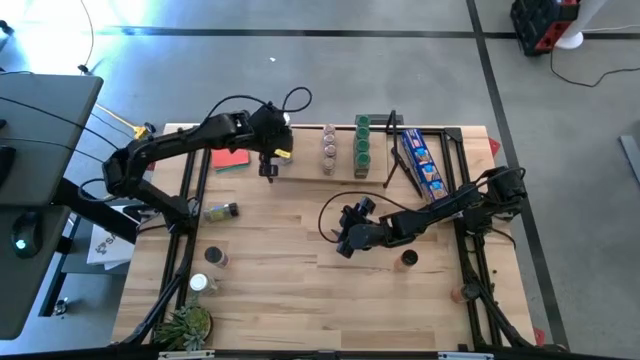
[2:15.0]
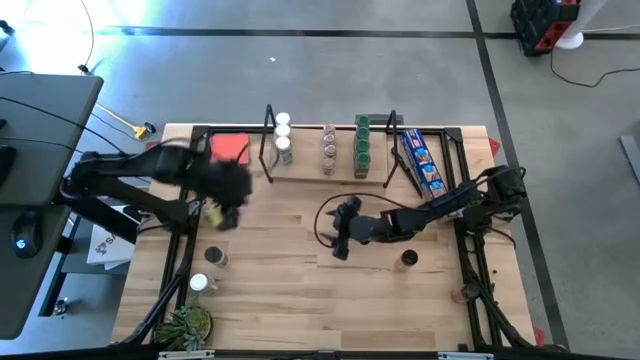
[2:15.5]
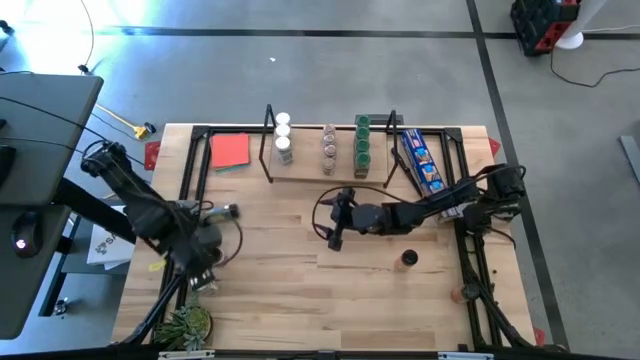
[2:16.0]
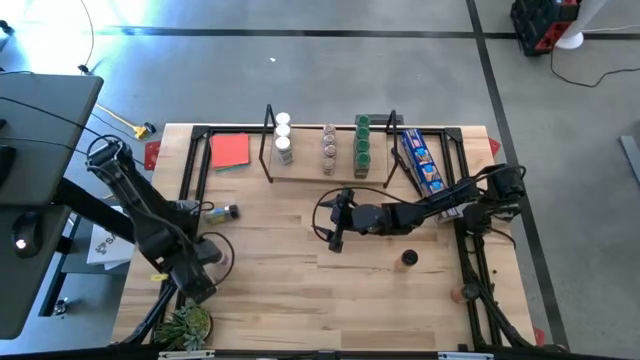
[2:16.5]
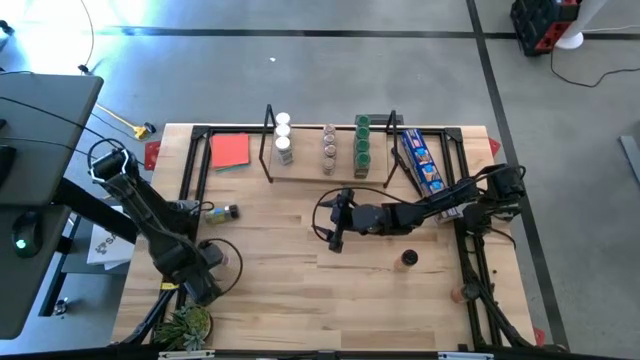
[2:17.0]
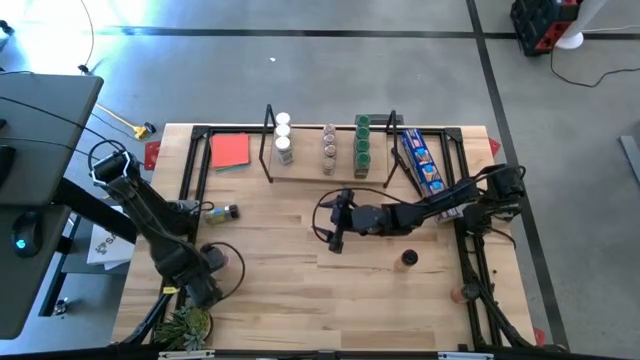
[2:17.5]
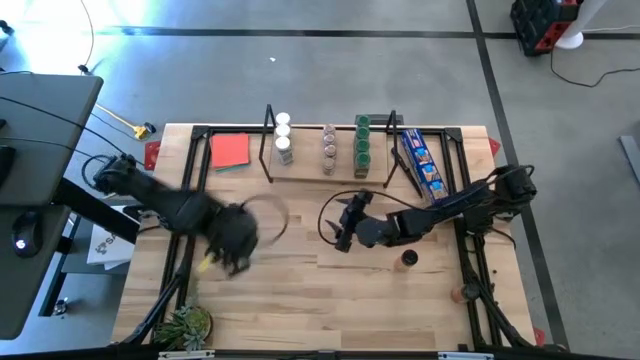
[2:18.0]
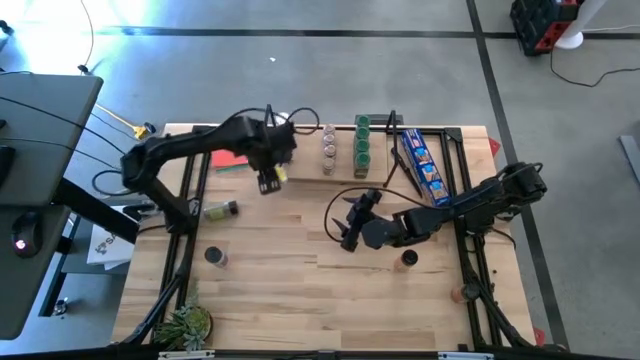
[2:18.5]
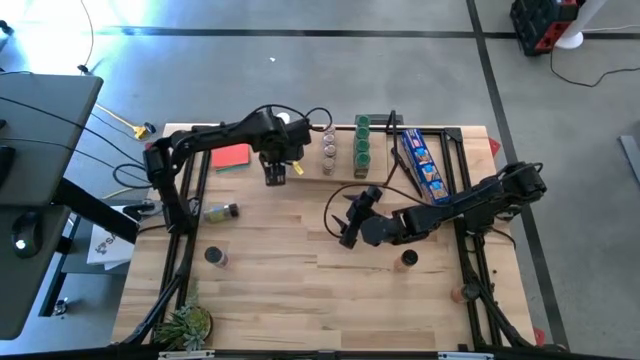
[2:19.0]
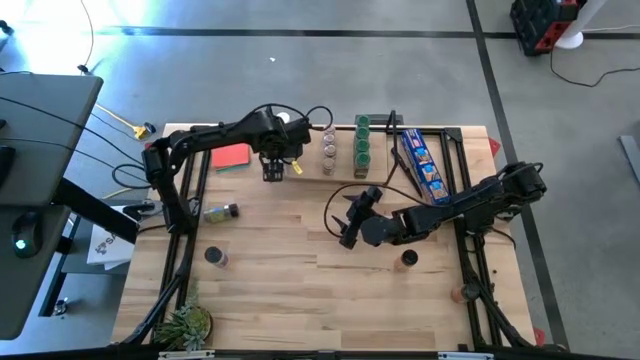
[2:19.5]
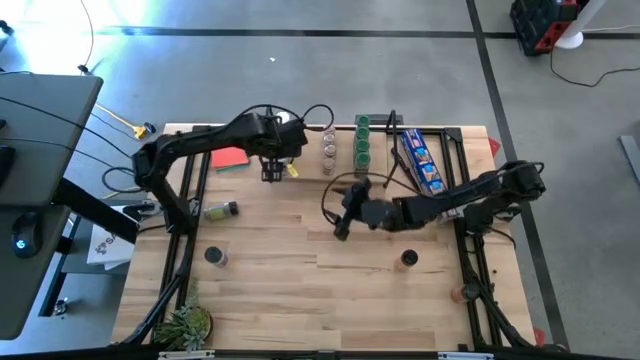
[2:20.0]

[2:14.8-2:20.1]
Task: Shelf spices
Put the white seasoning bottle on the shelf aligned with the other white seasoning bottle

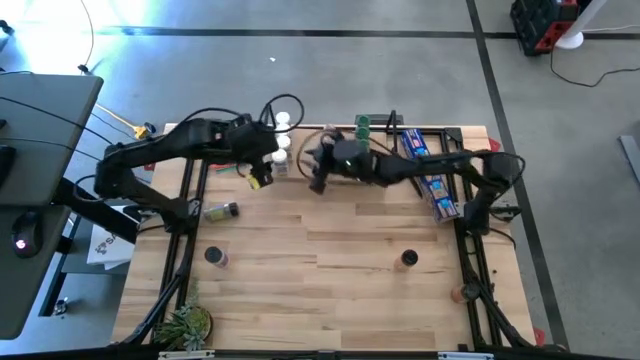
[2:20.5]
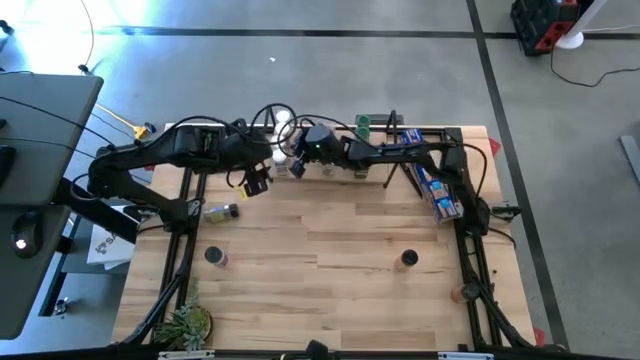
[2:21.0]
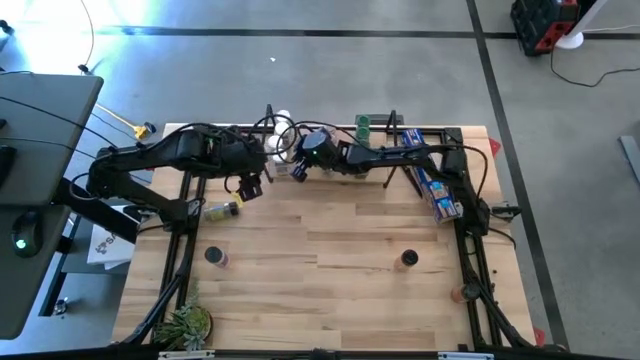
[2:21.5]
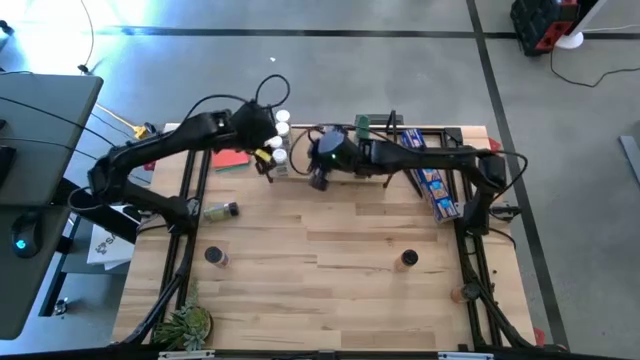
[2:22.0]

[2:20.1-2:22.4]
Adjust the white seasoning bottle

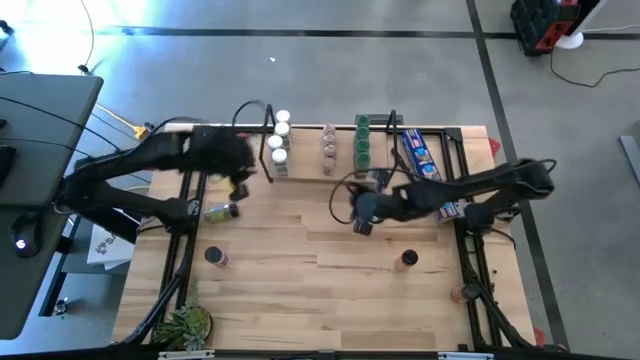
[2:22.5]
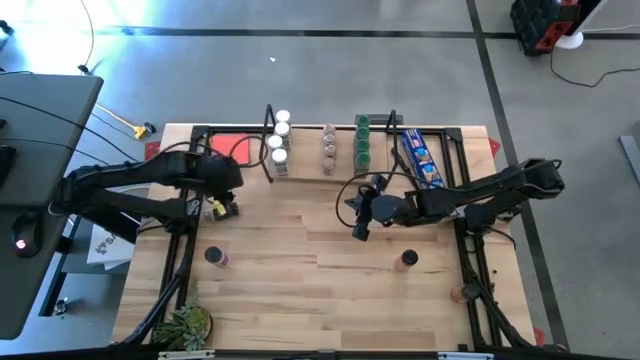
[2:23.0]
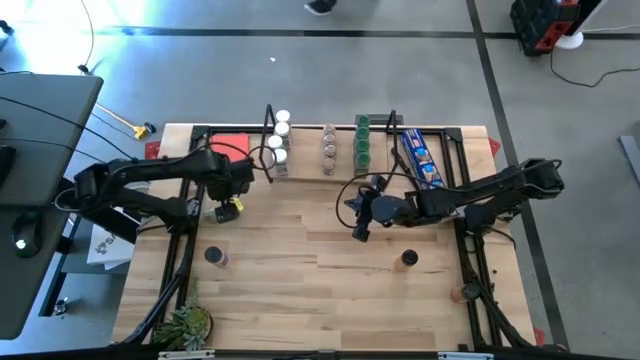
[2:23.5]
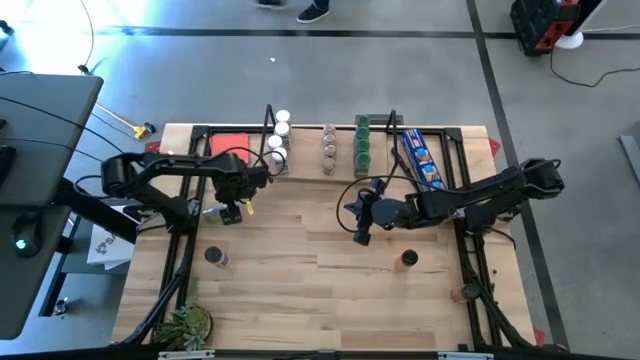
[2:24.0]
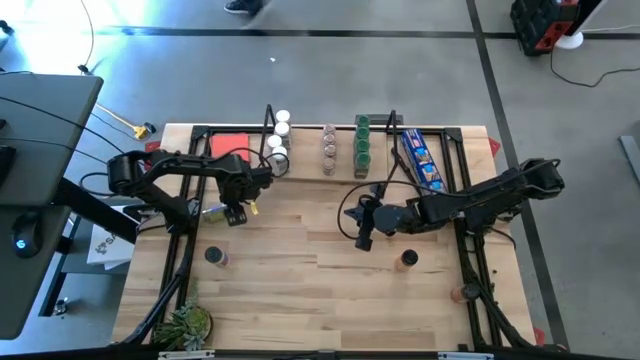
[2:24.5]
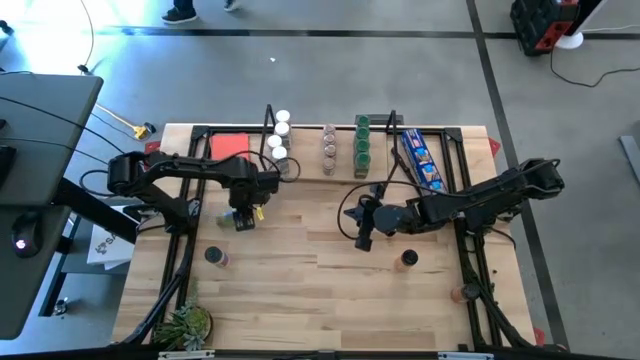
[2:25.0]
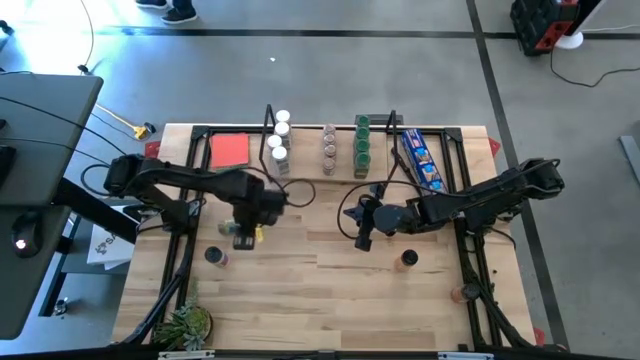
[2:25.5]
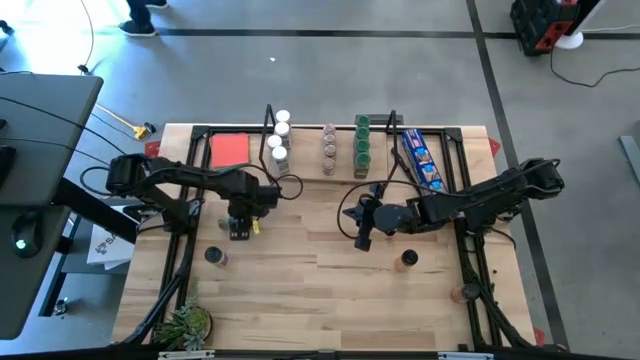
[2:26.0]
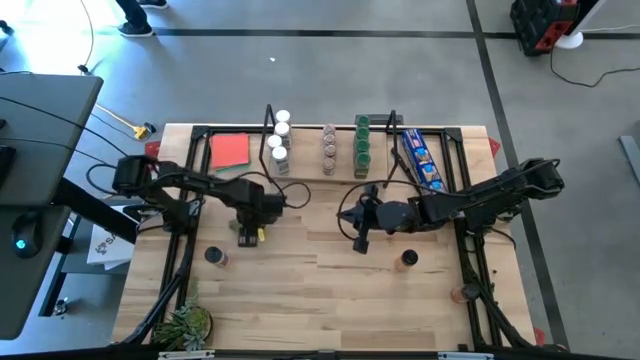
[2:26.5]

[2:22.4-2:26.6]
Put the black seasoning bottle on the shelf

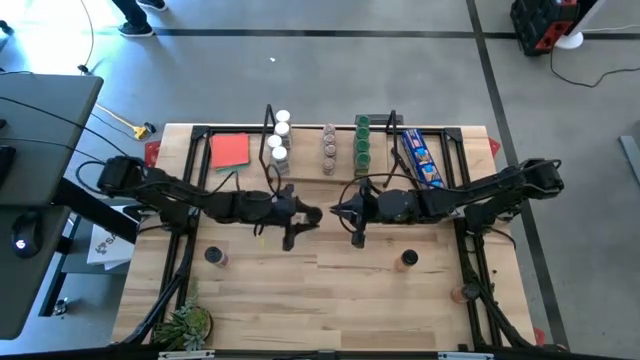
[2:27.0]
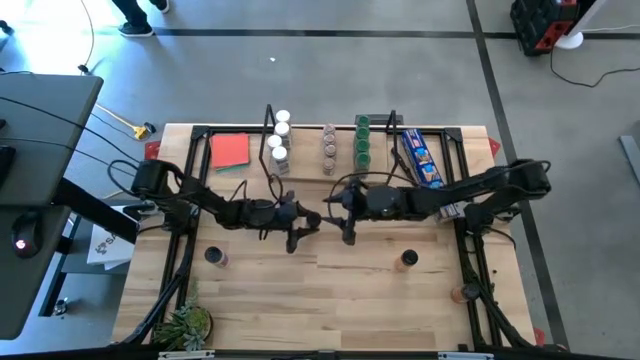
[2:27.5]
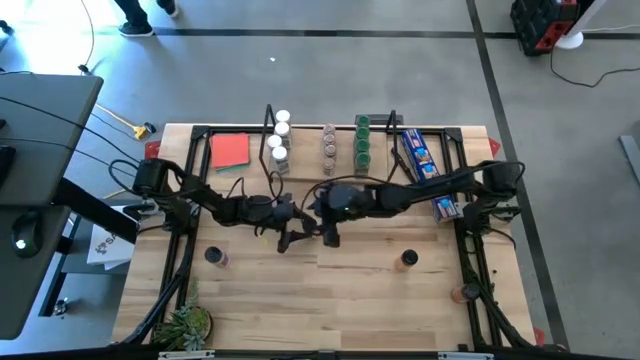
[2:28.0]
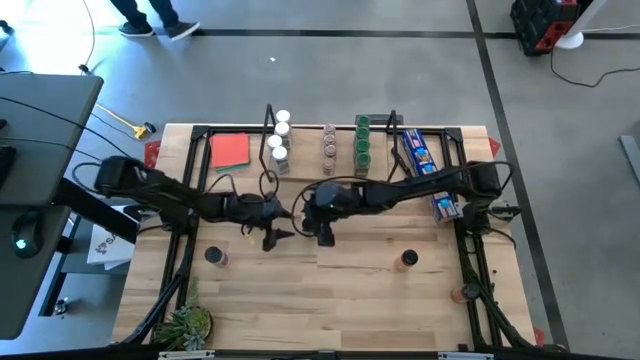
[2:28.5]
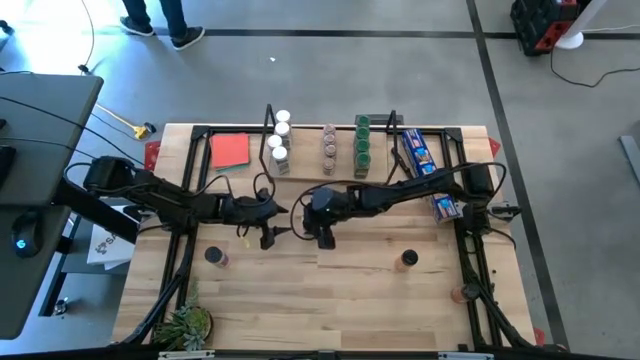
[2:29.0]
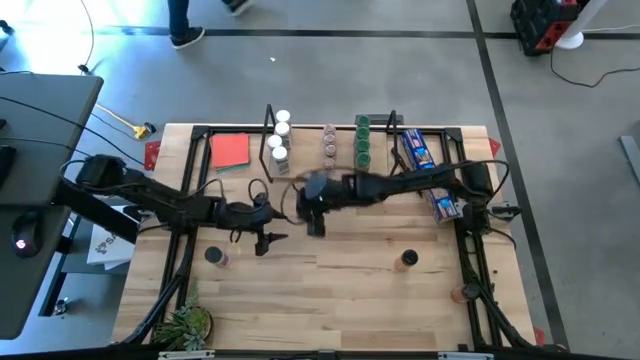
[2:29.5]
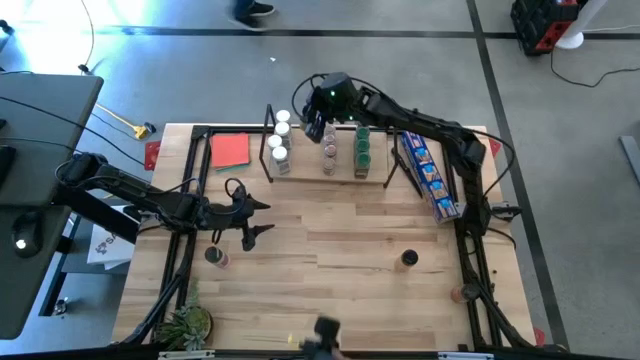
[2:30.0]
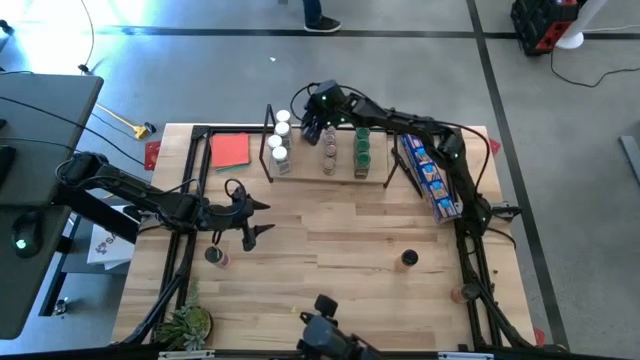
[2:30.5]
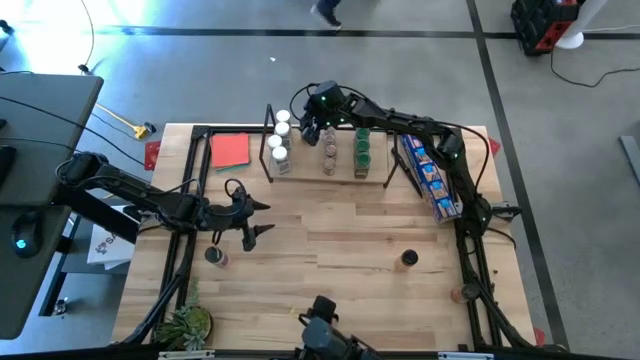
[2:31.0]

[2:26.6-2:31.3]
Put the black seasoning bottle on the shelf

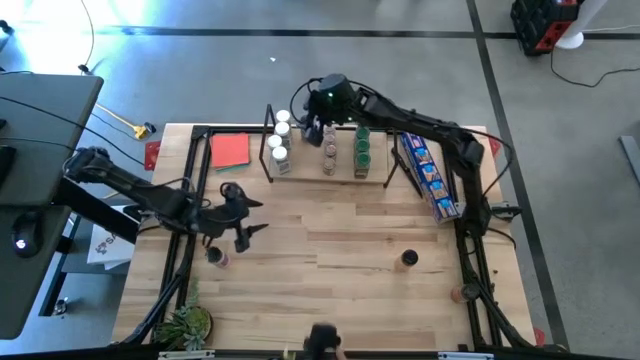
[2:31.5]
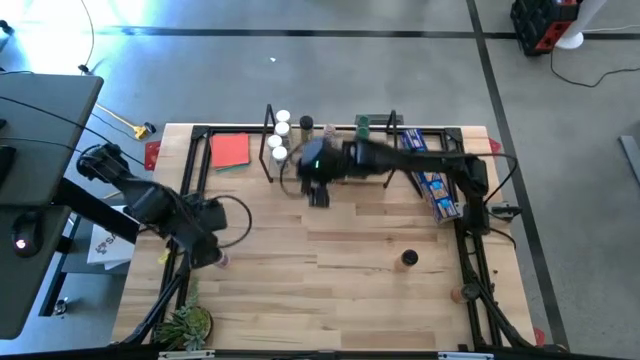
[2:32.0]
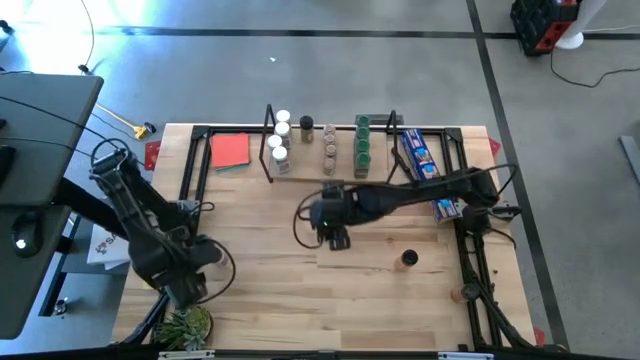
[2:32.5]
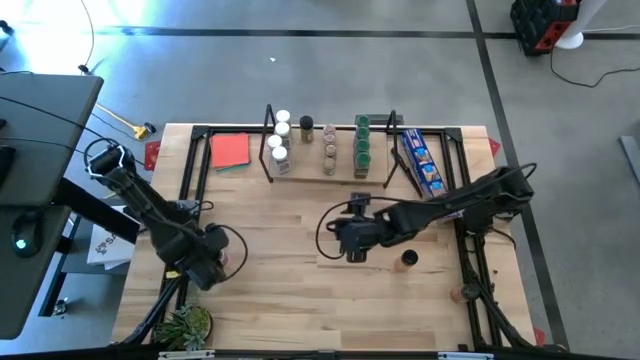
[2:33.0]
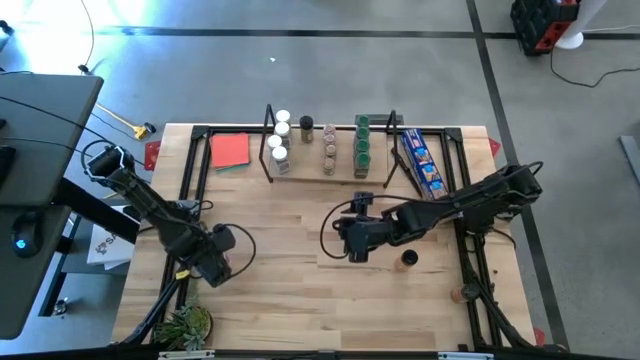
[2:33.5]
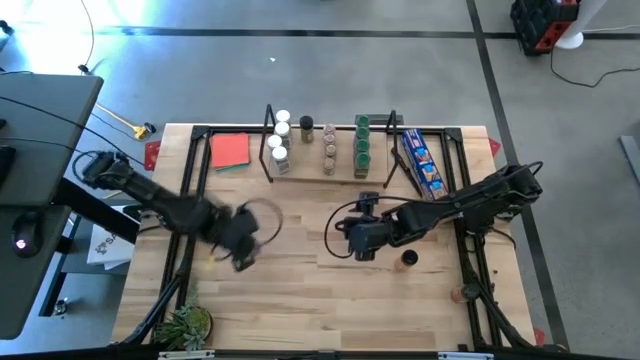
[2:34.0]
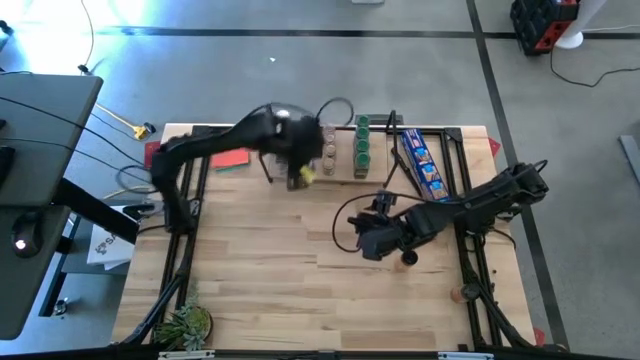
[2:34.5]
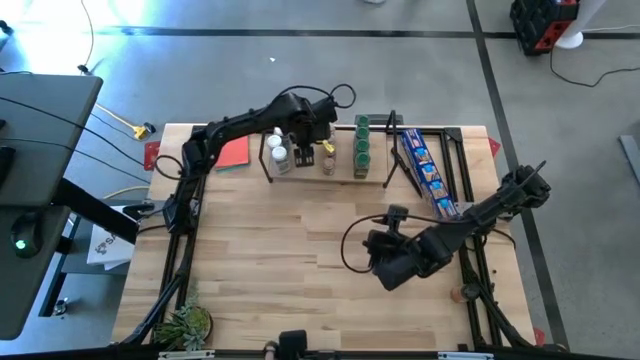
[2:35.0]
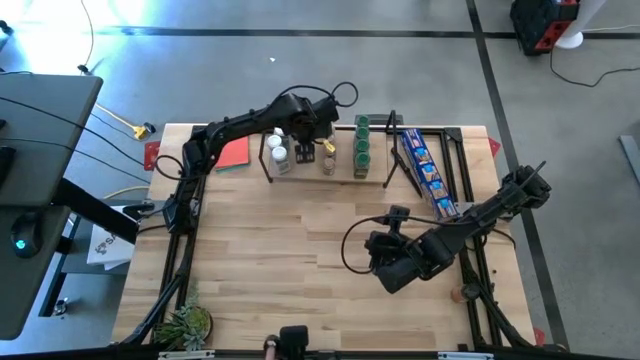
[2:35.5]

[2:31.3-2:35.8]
Put the black seasoning bottle on the shelf aligned with the other black seasoning bottle
